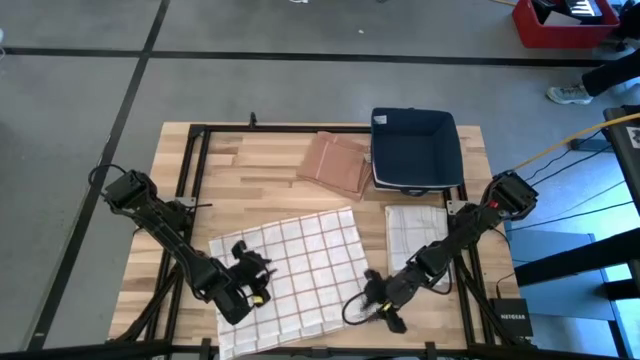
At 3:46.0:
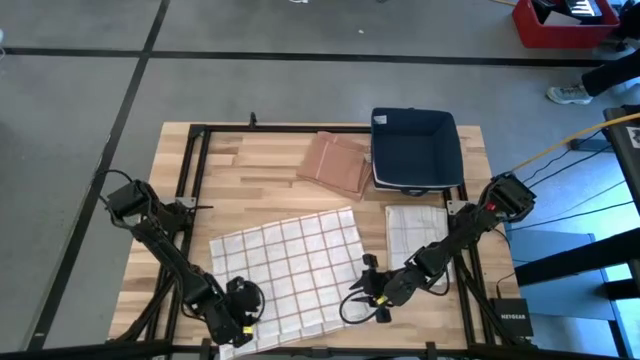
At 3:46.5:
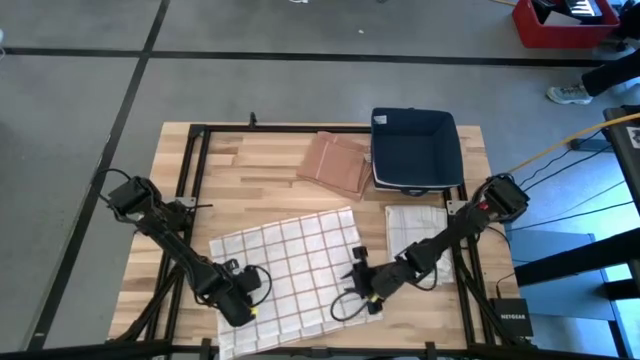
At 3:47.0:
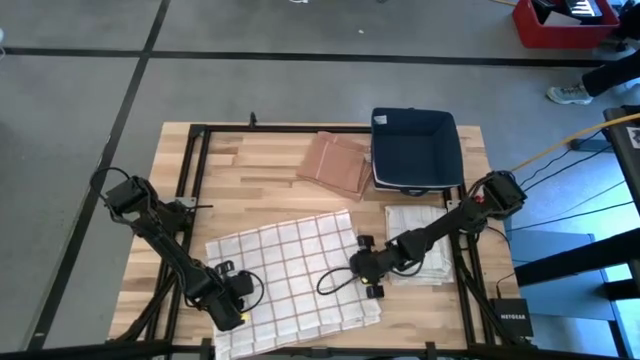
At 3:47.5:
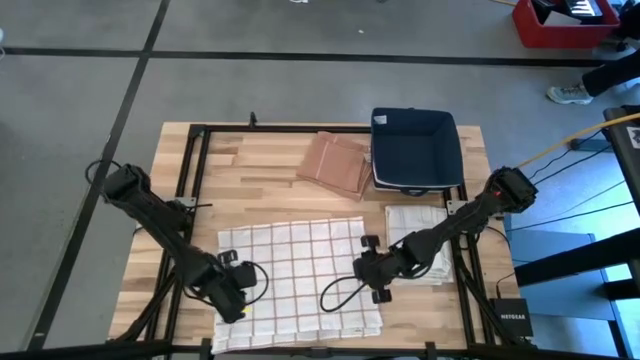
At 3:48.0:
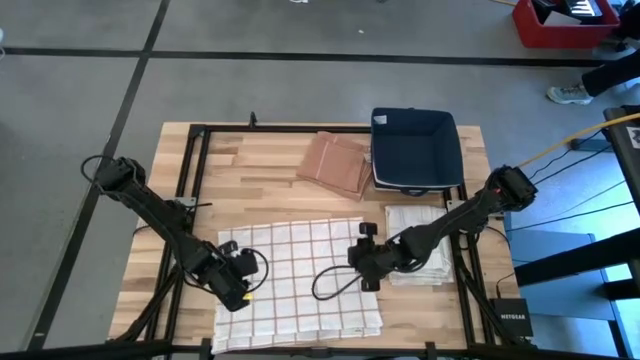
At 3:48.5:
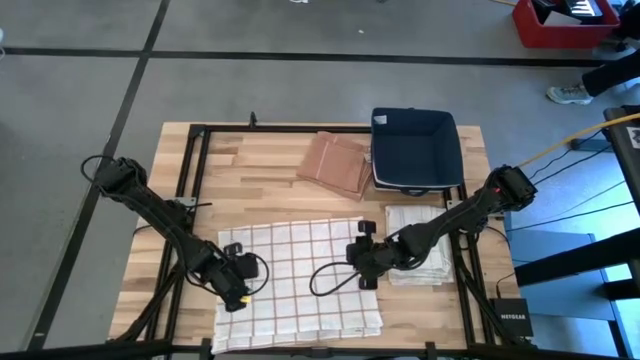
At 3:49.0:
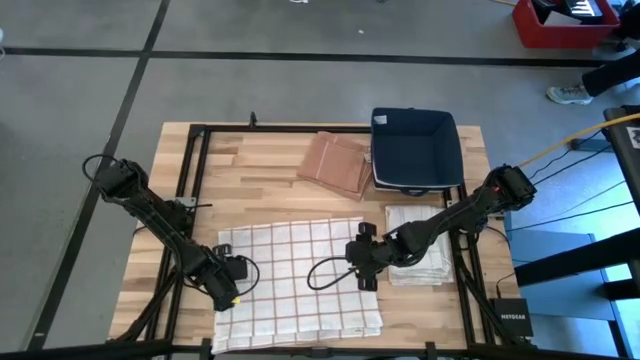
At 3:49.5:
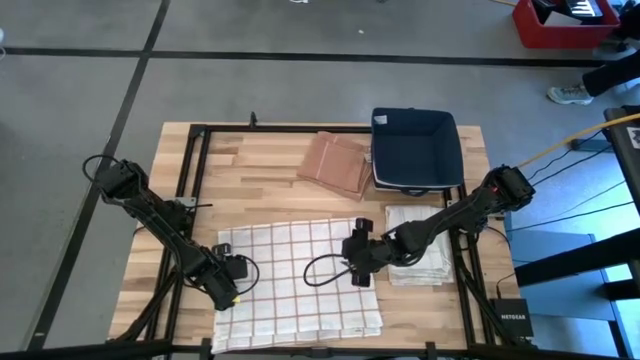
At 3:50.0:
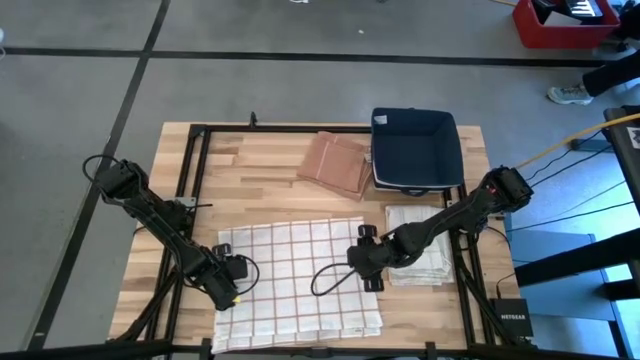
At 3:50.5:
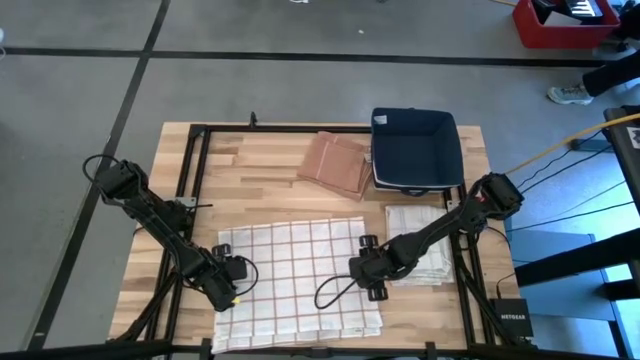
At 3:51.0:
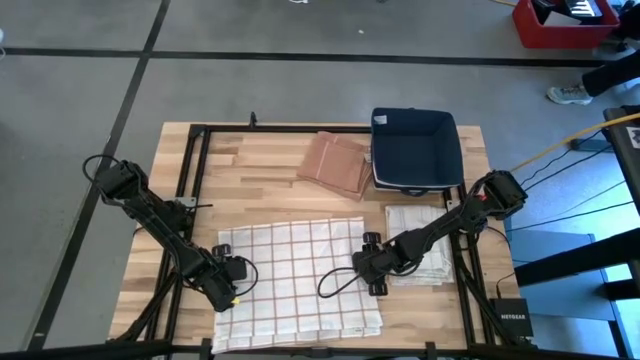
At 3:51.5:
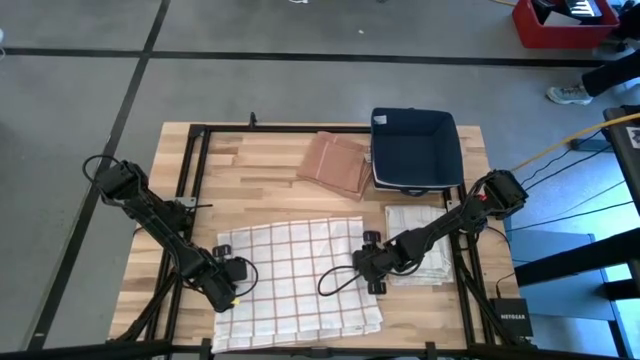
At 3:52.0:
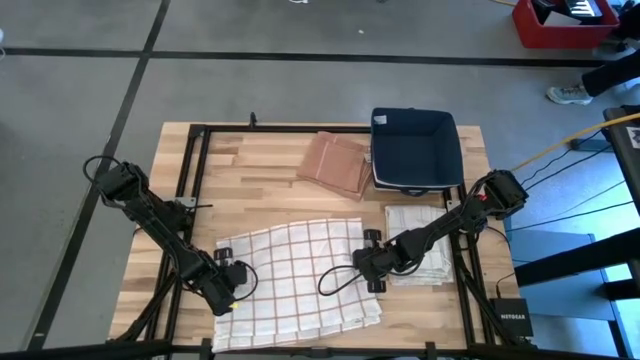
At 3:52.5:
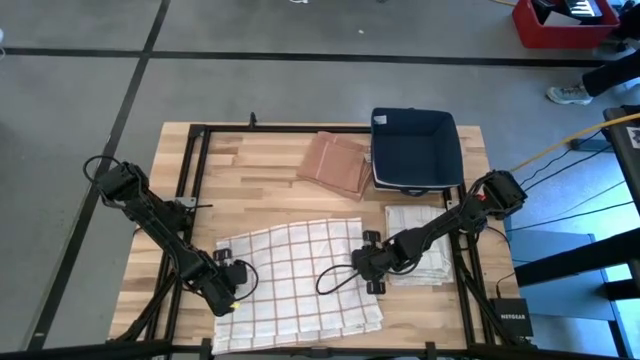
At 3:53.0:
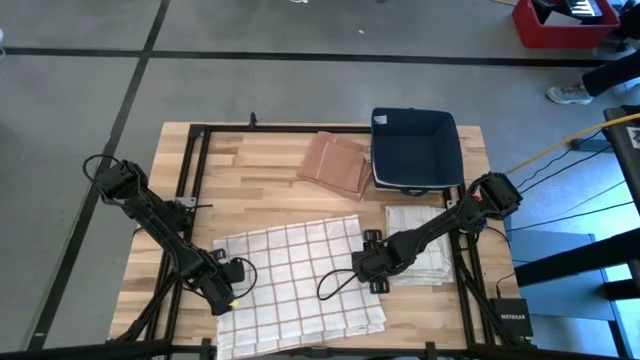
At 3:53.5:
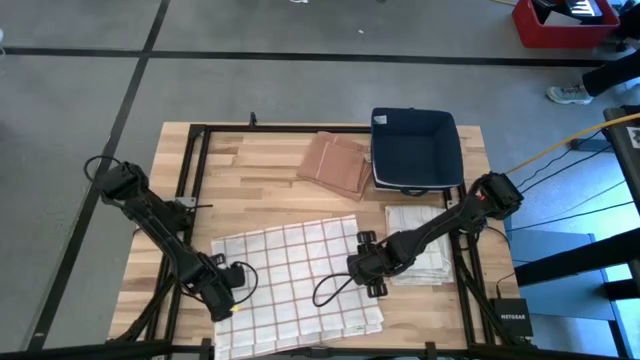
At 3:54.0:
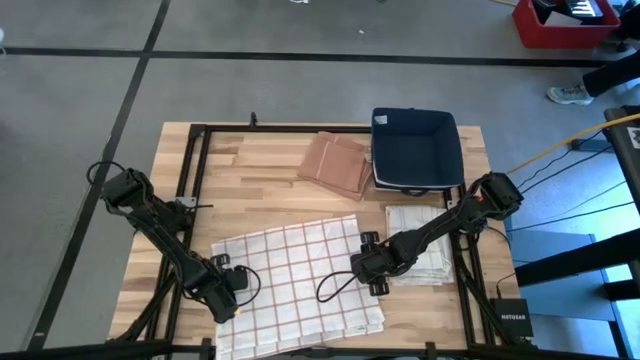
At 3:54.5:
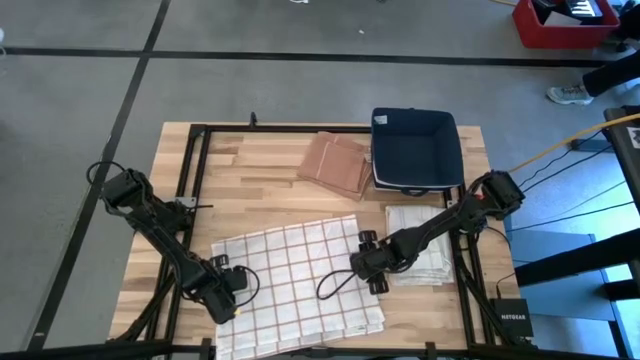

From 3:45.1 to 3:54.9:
Task: Fold towel
Fold the white towel

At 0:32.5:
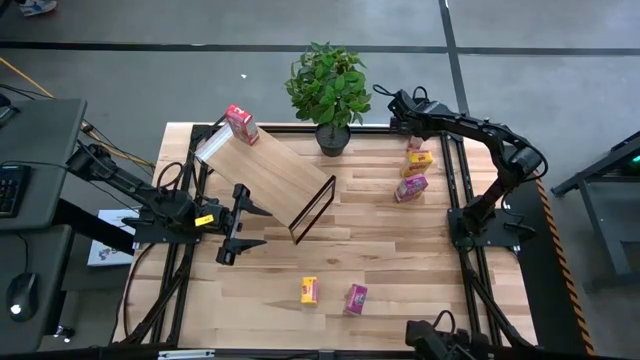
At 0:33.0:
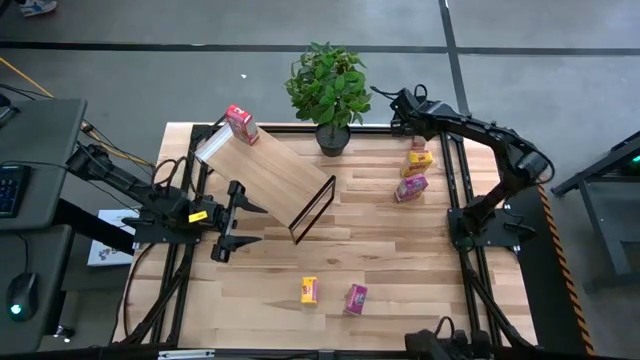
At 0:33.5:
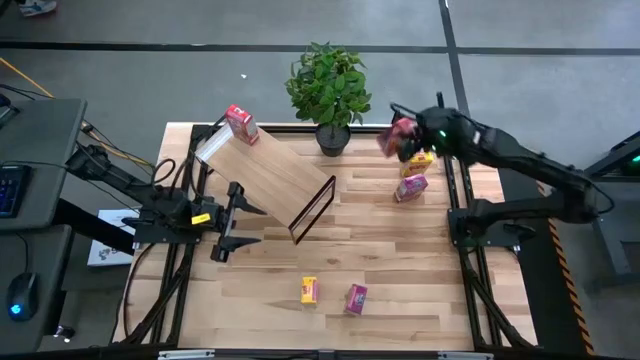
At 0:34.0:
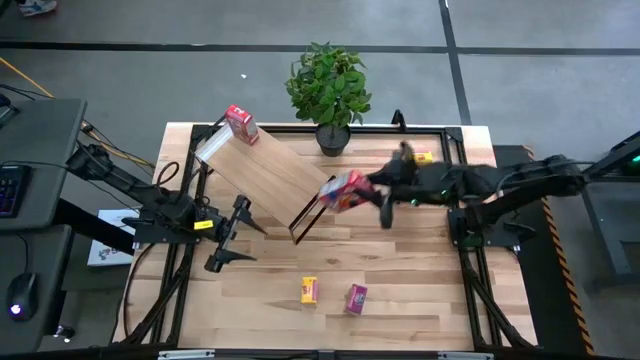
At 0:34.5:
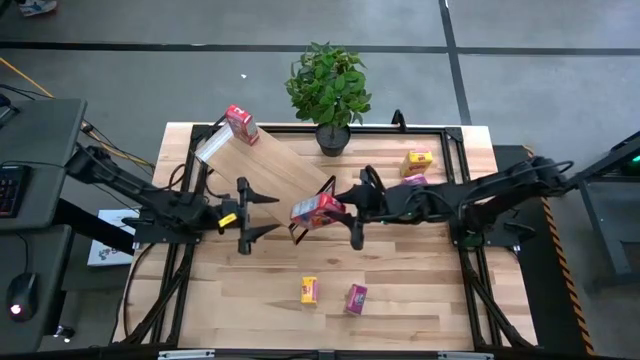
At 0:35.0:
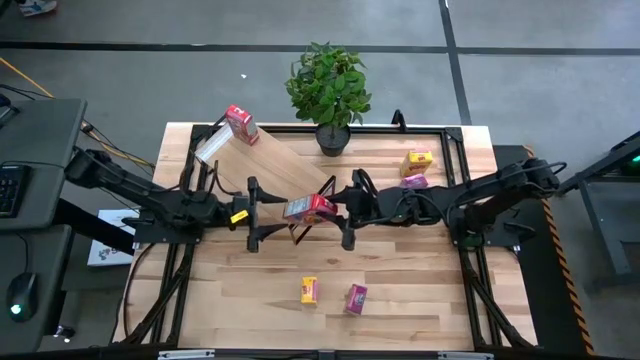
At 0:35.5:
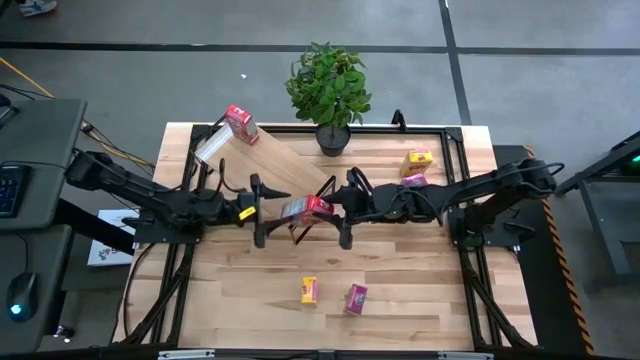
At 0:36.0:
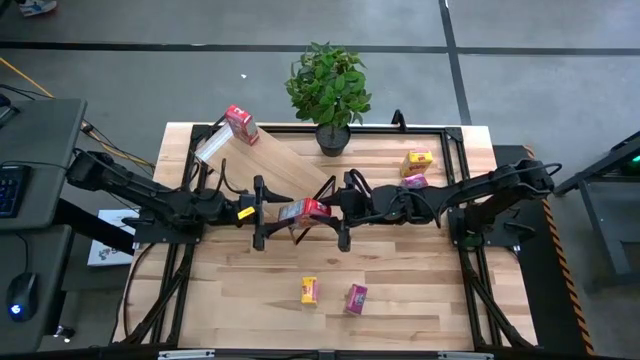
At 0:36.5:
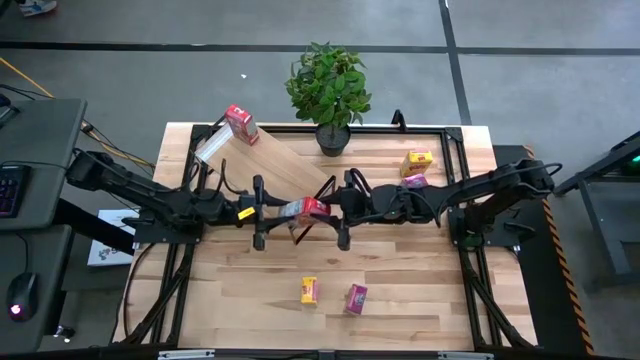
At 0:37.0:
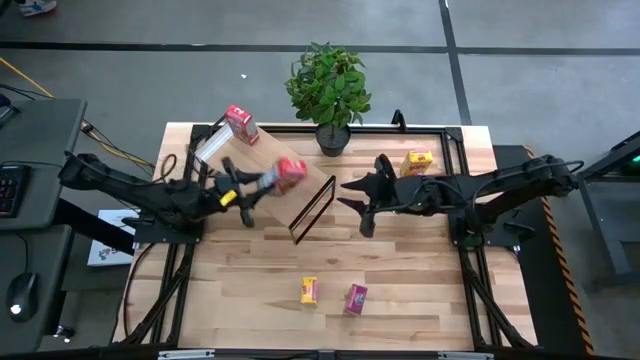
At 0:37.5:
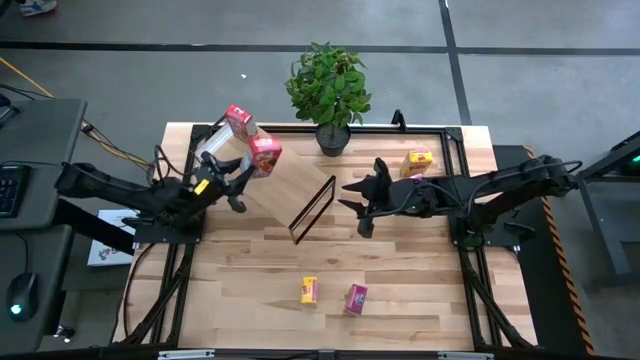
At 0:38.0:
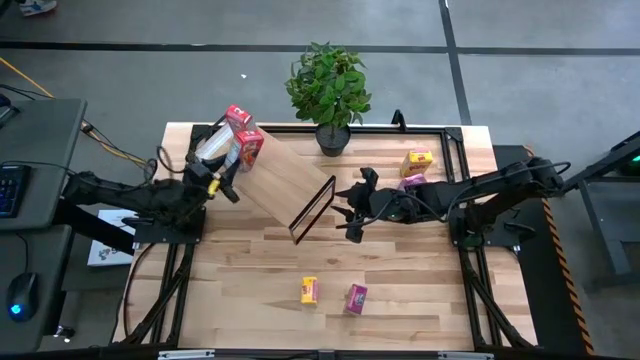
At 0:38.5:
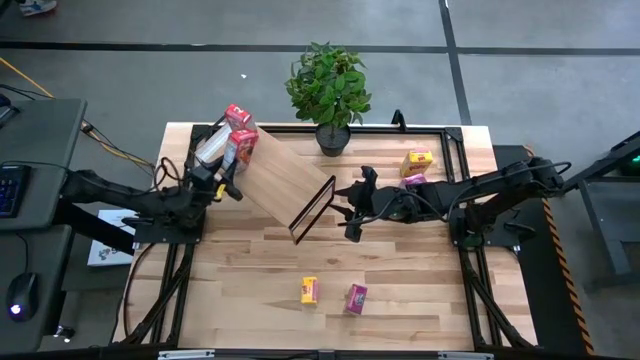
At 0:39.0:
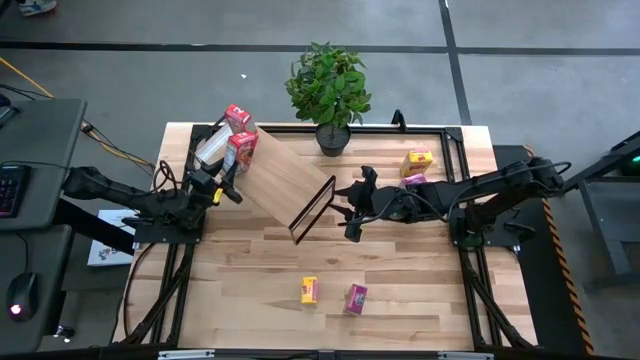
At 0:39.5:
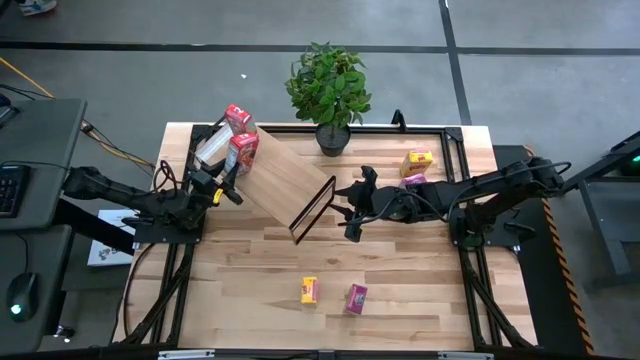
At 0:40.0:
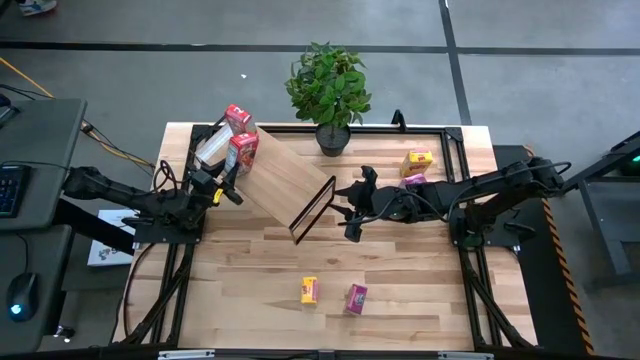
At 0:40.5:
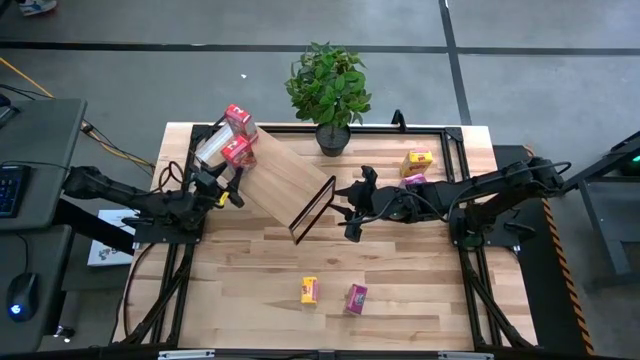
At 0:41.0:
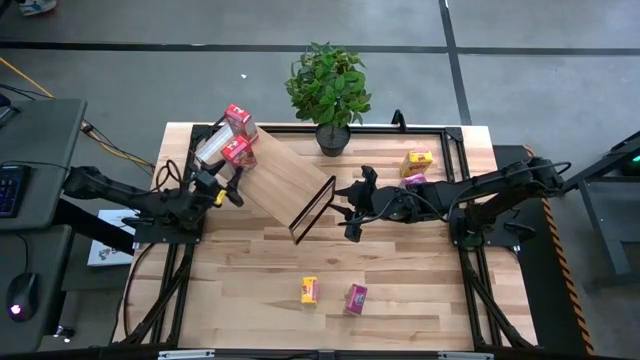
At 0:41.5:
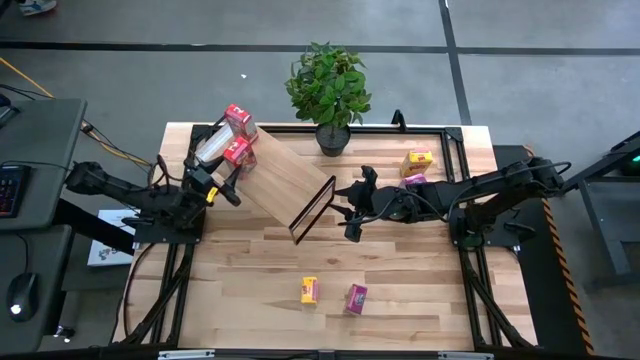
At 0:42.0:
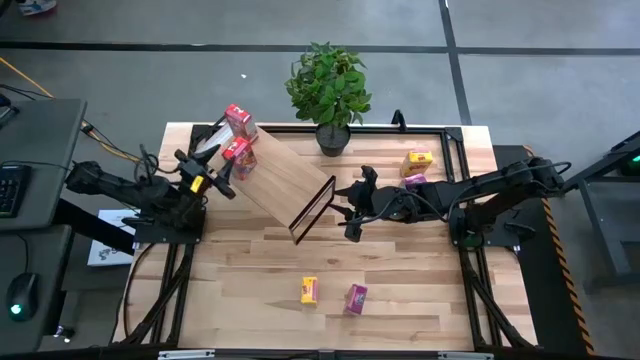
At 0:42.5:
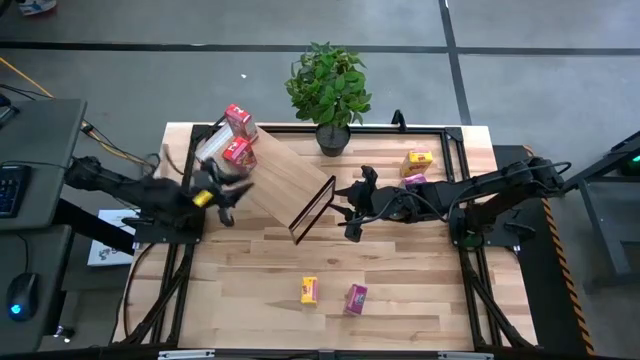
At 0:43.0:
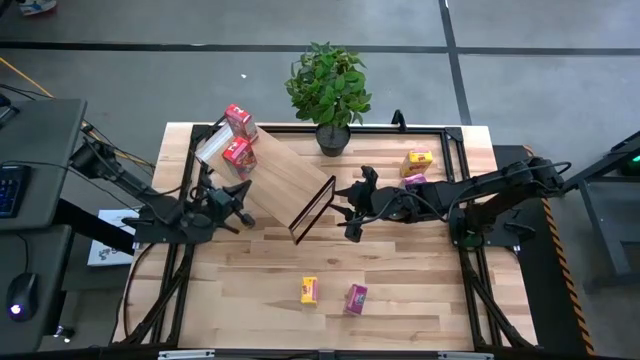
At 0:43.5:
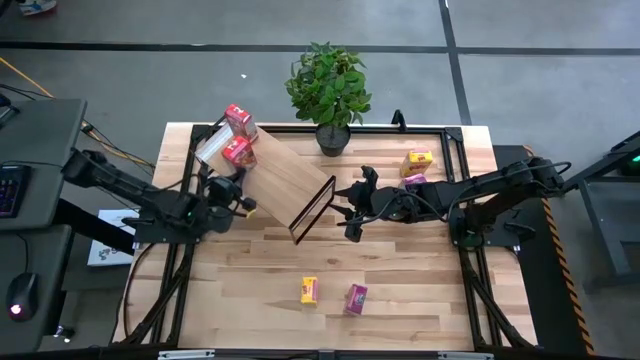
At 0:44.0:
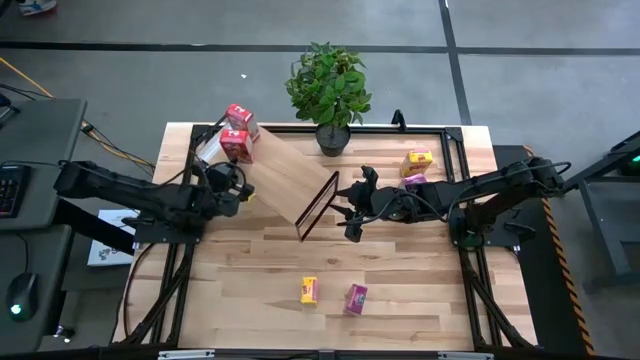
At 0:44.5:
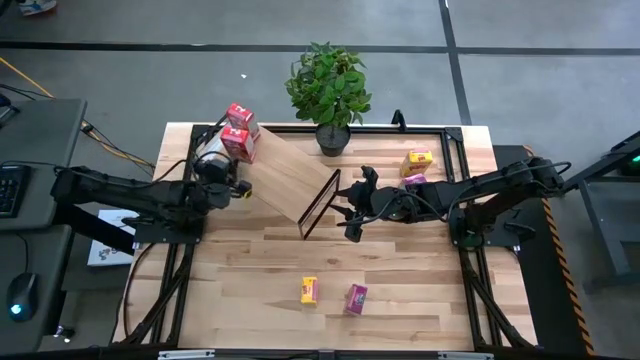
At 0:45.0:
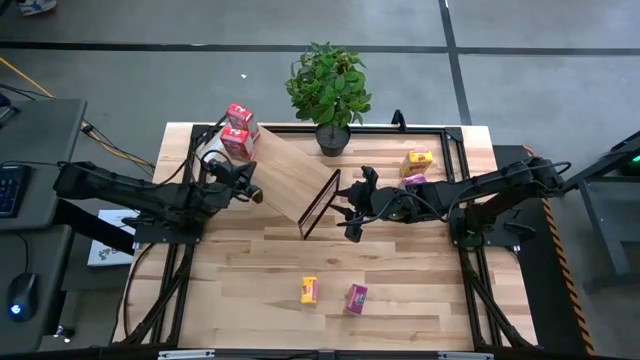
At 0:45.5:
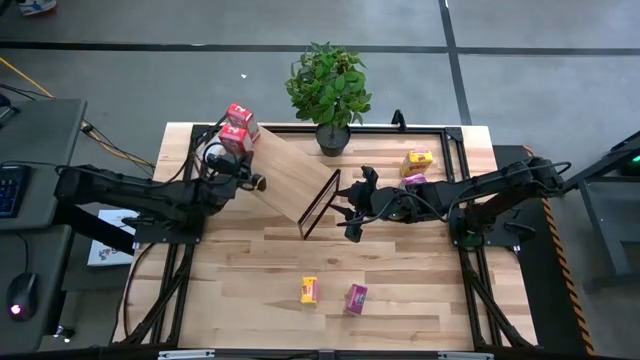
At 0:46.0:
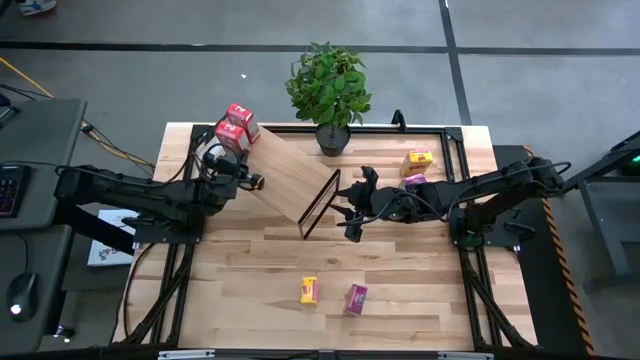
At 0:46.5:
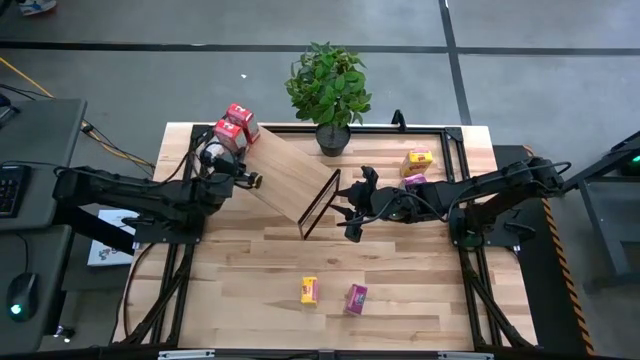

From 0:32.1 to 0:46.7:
Task: Stack cereal on shelf
Put the red cereal box on the shelf aligned with the other red cereal box
